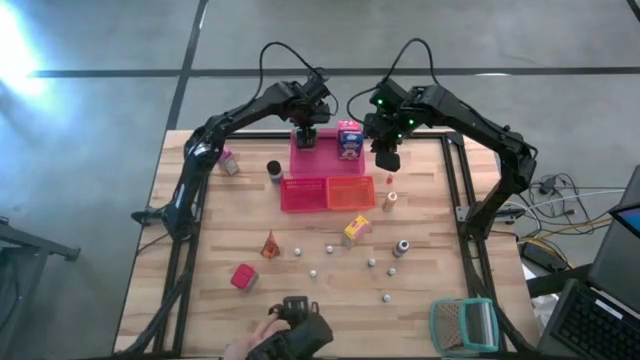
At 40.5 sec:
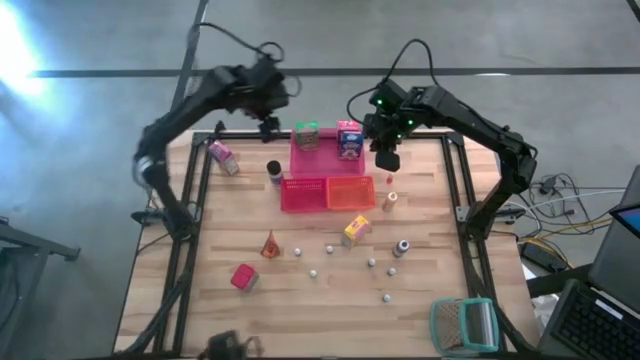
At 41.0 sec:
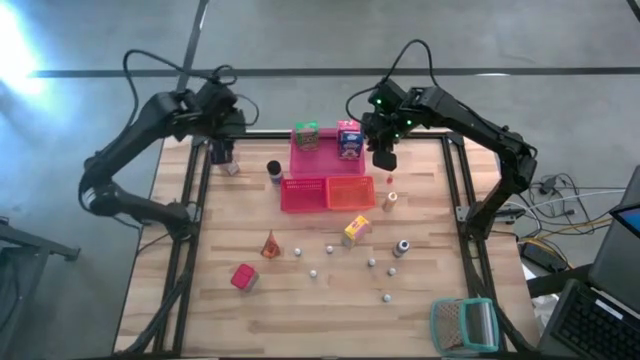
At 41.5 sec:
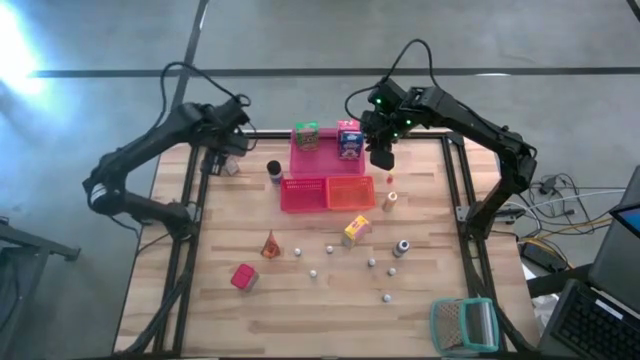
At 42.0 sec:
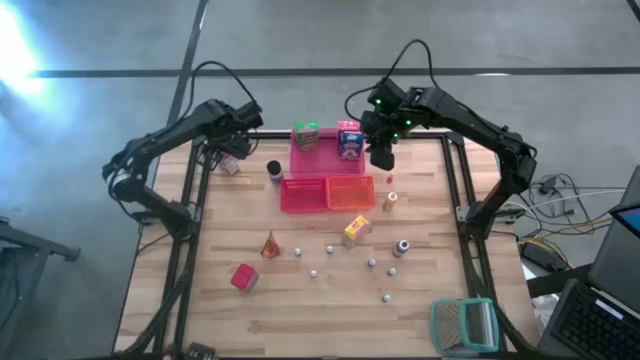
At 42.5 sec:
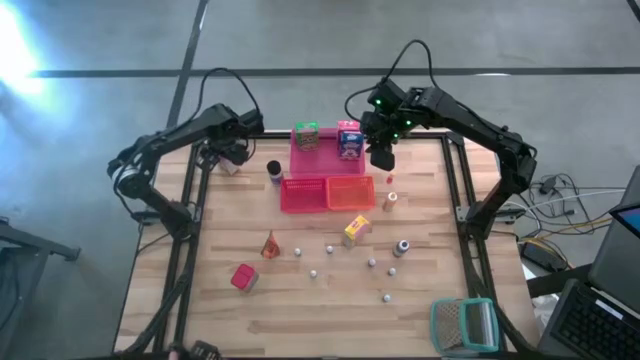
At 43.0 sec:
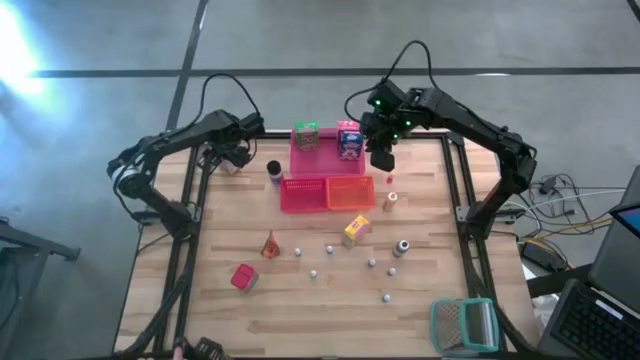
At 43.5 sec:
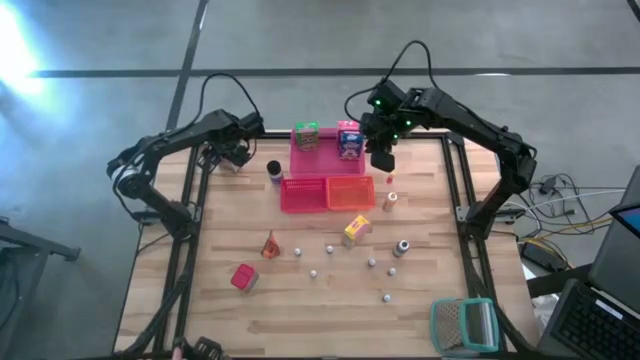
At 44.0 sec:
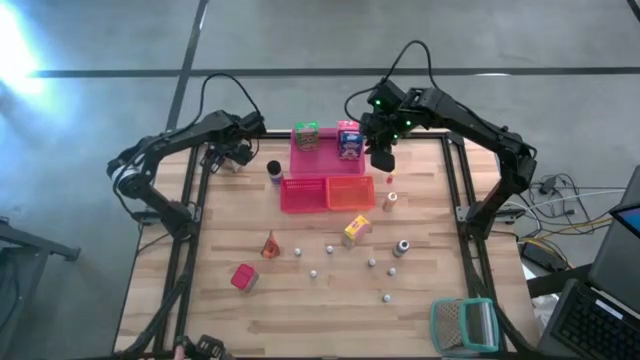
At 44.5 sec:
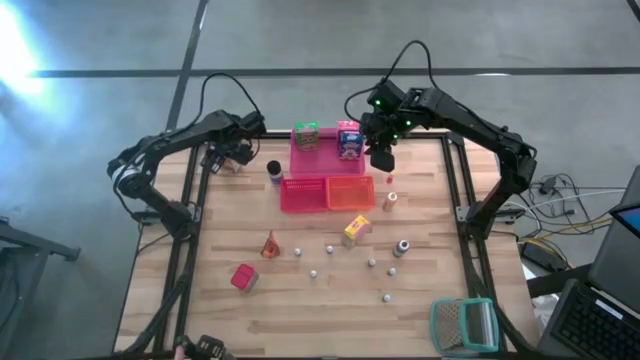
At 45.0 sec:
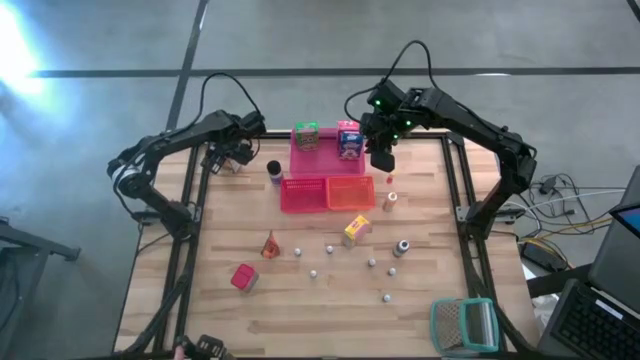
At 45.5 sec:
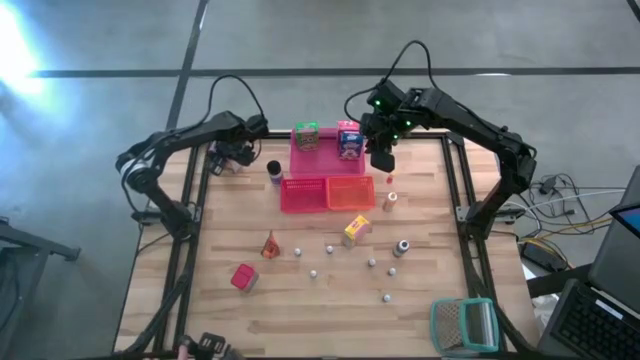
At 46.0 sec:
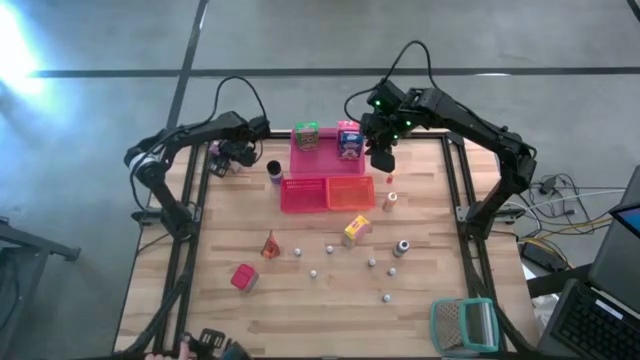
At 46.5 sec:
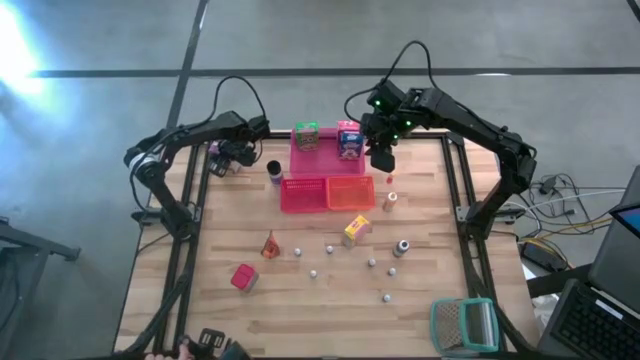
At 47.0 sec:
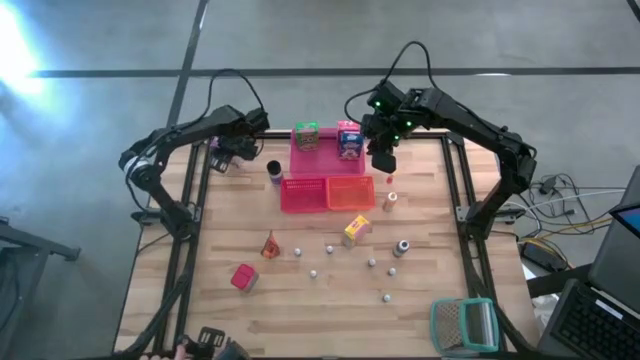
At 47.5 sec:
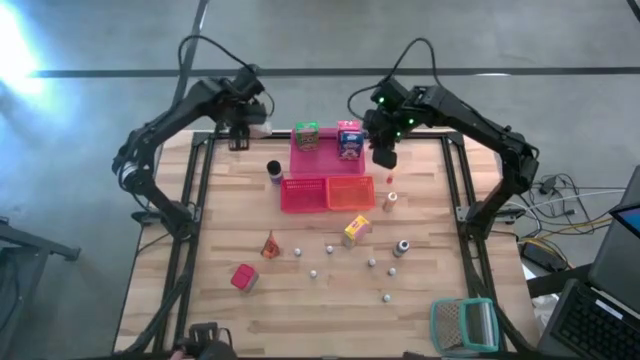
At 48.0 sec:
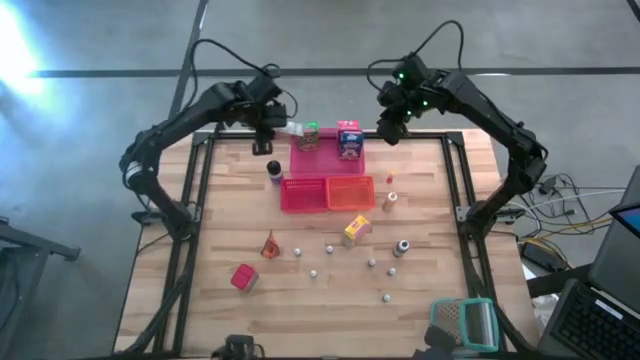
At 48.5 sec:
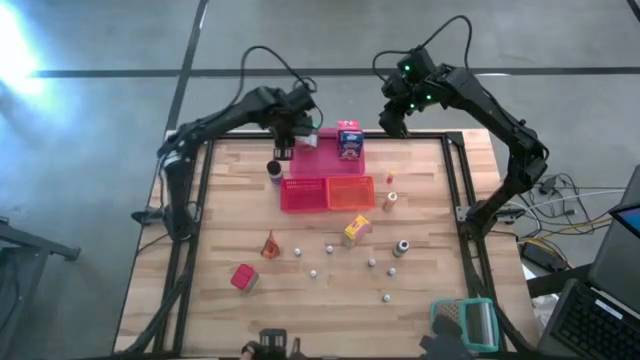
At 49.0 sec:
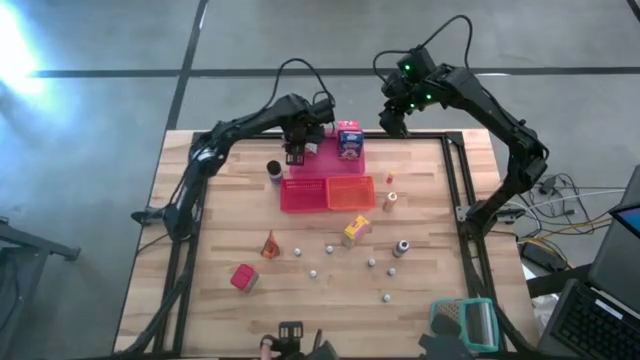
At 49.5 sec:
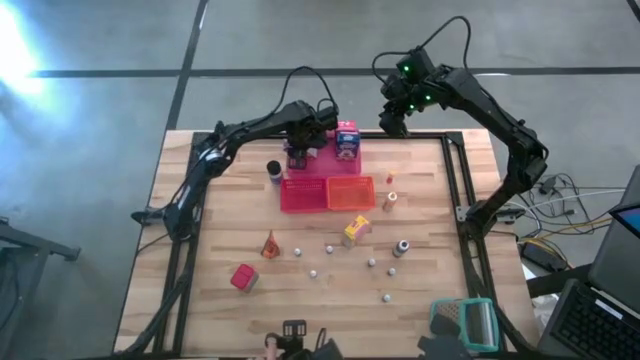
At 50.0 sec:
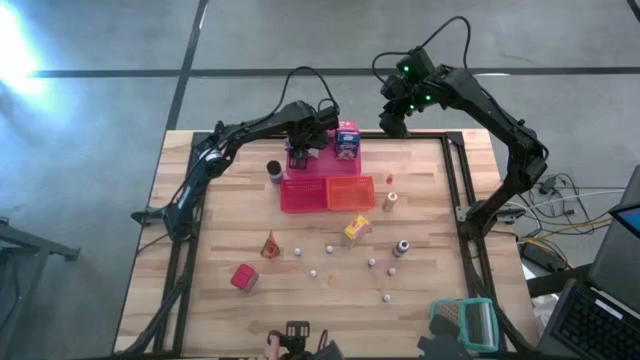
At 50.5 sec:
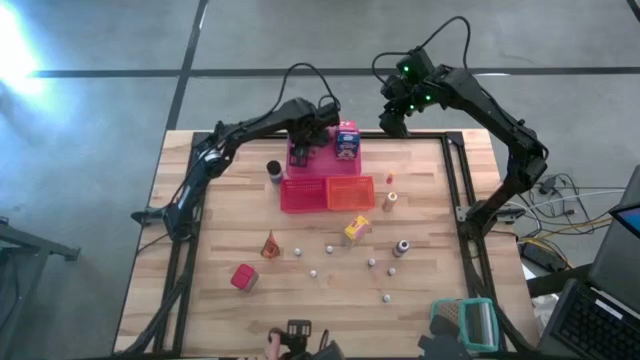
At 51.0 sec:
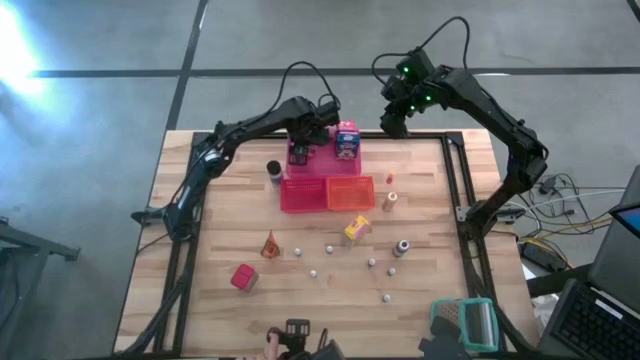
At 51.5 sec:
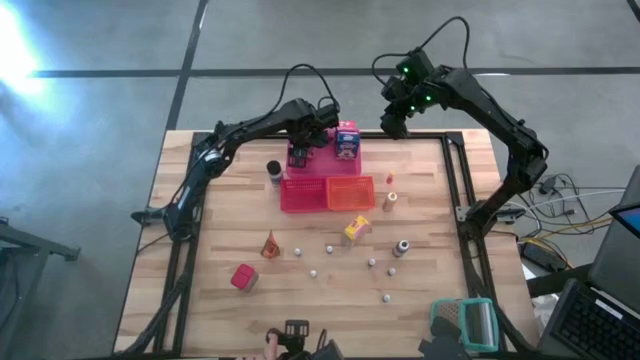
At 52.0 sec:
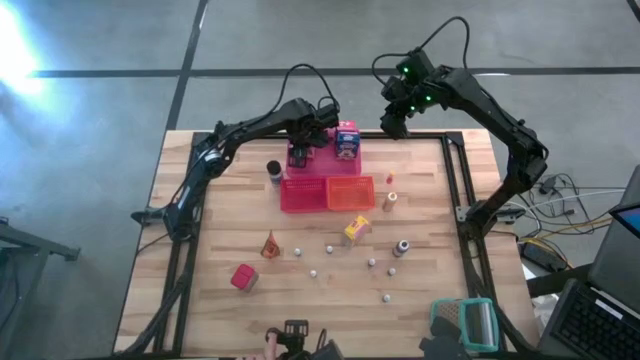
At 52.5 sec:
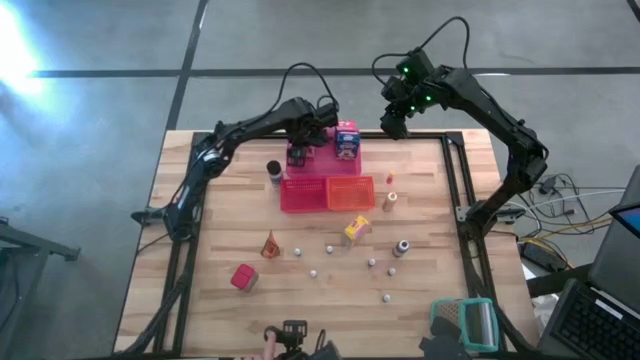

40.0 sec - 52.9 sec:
Task: Pick & Place Kitchen Items
Put the violet cereal box into the pink bin

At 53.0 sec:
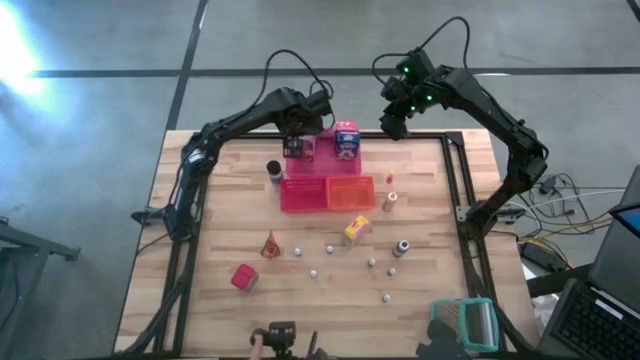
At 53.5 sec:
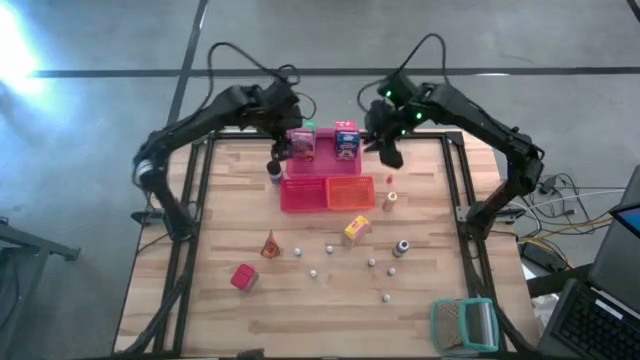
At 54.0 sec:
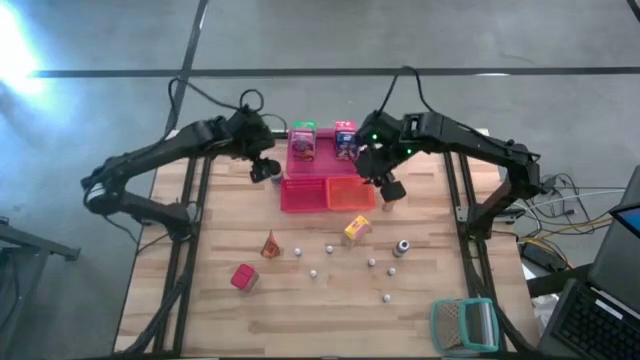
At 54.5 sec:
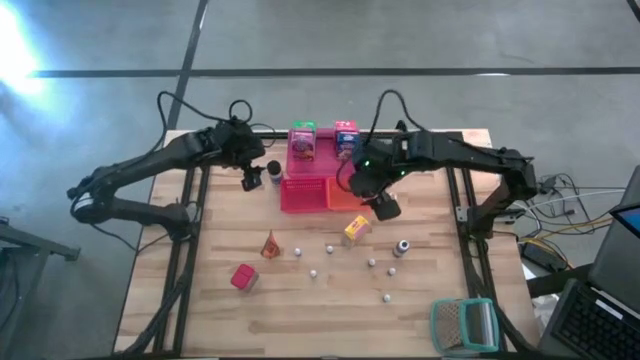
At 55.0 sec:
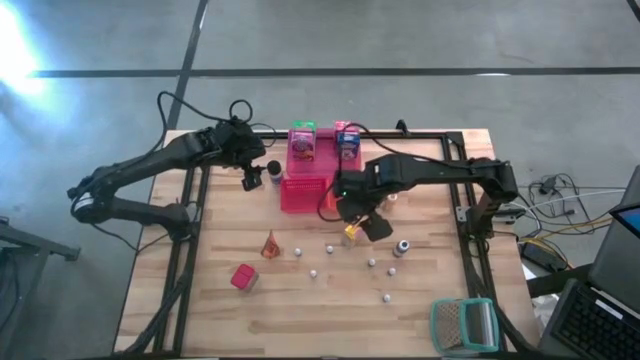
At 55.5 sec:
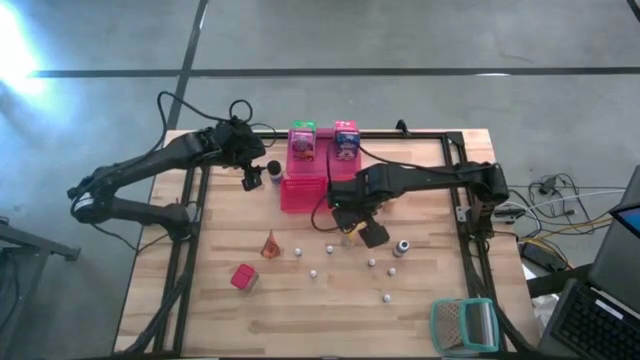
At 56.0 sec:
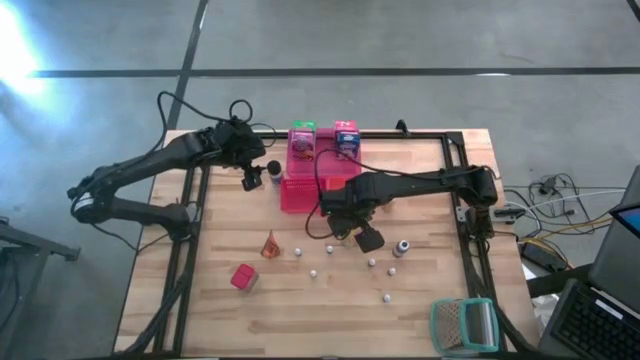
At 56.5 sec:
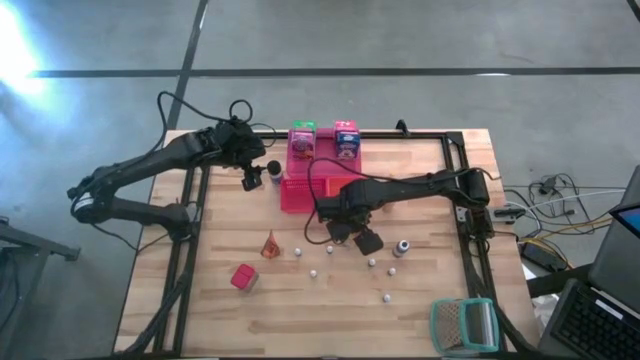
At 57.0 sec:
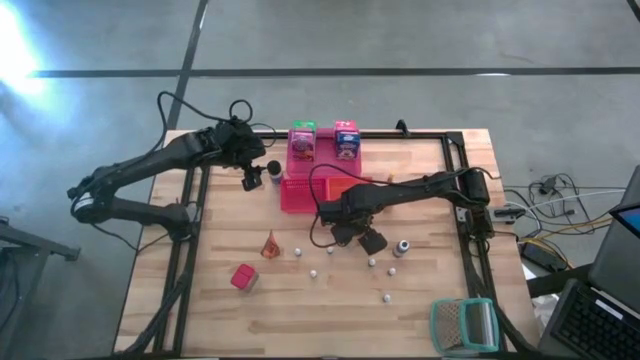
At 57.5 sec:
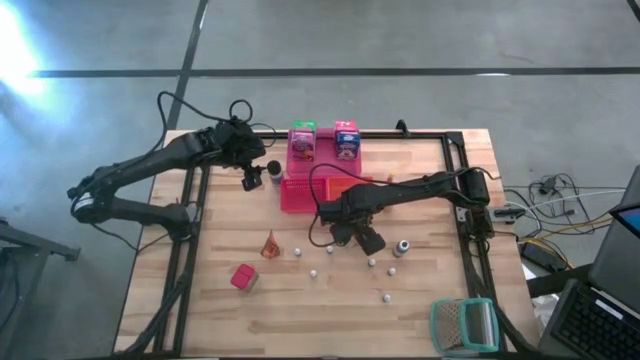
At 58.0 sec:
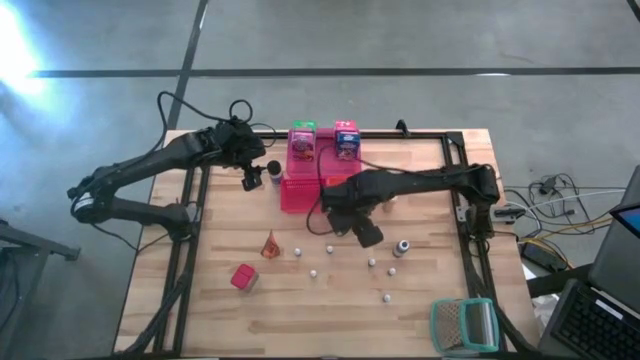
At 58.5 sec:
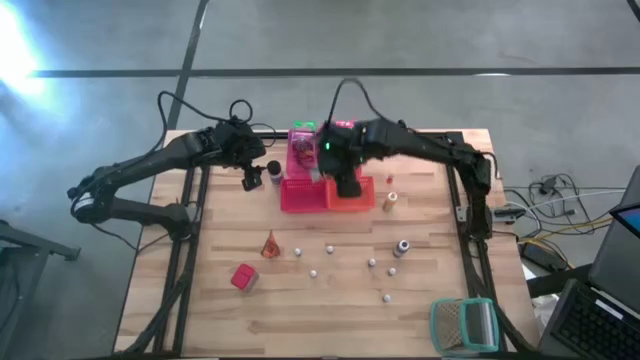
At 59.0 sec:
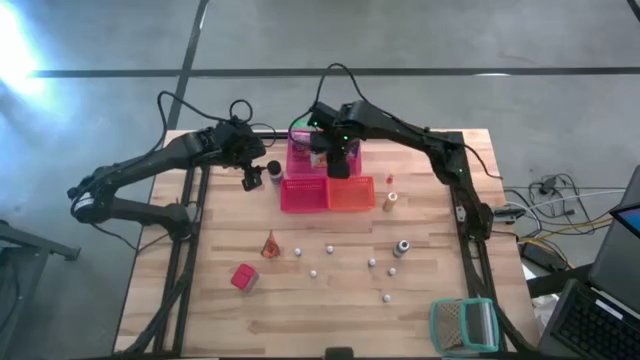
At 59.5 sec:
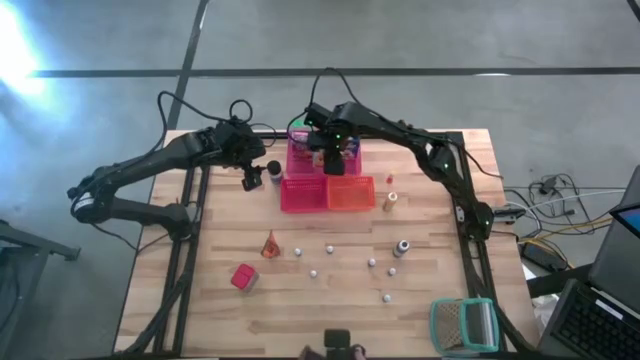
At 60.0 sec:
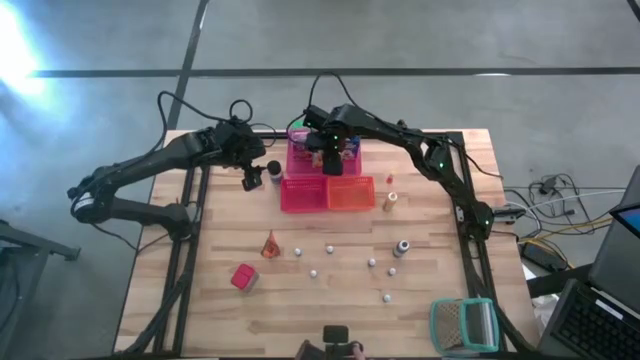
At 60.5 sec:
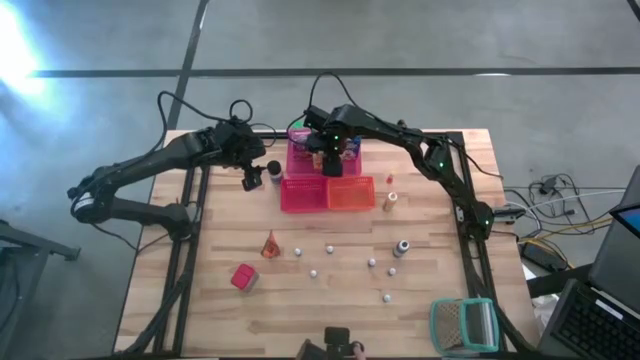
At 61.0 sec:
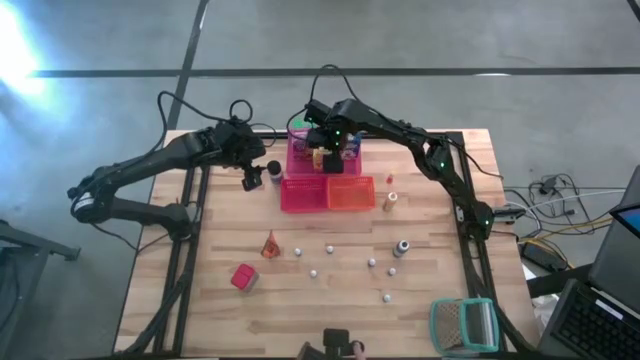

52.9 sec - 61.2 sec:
Put the yellow cereal box into the pink bin
